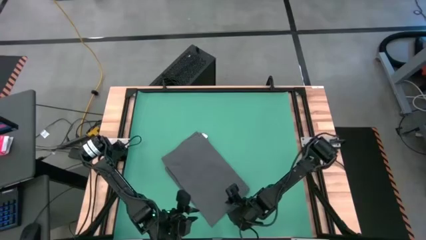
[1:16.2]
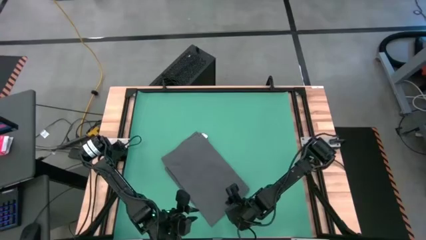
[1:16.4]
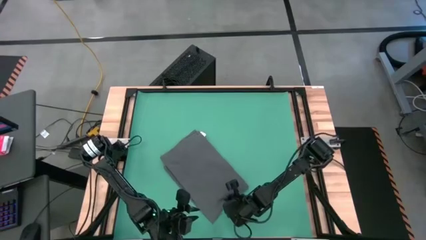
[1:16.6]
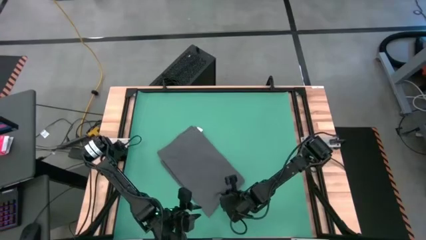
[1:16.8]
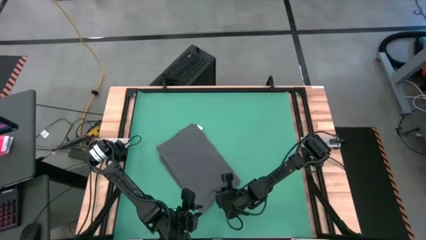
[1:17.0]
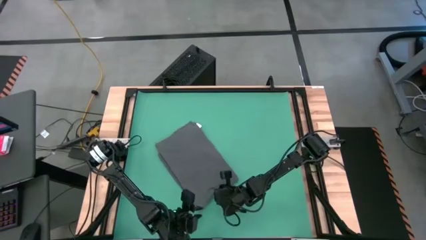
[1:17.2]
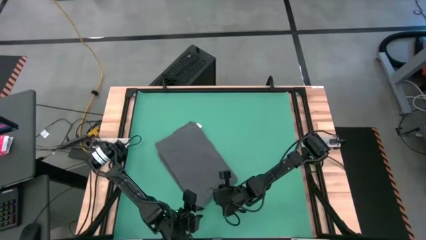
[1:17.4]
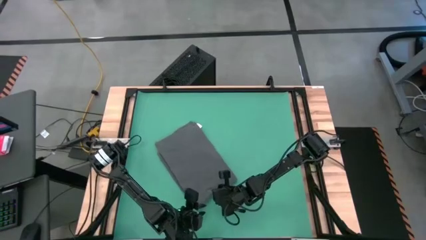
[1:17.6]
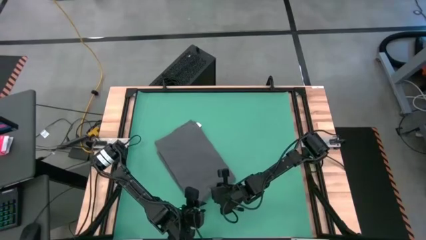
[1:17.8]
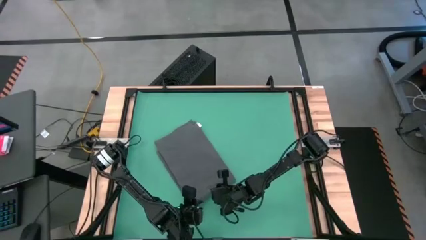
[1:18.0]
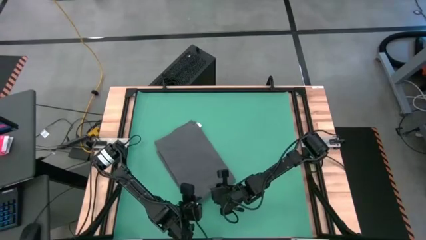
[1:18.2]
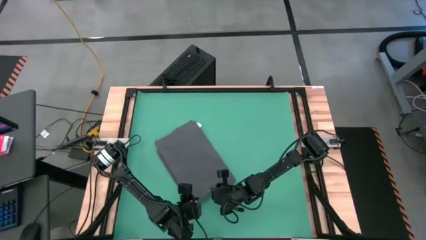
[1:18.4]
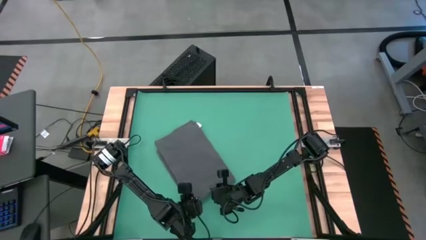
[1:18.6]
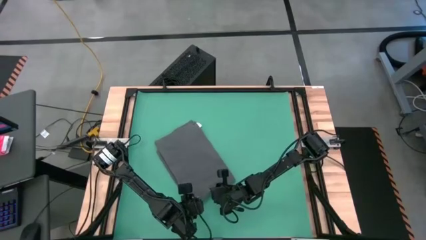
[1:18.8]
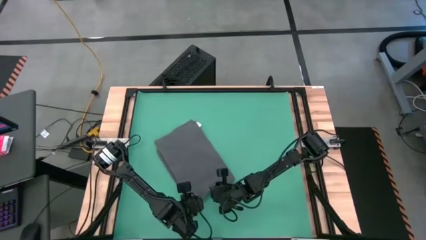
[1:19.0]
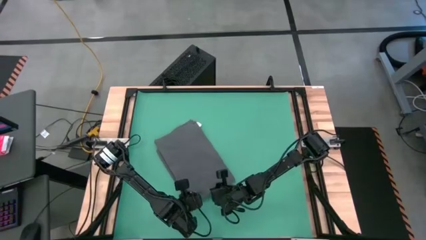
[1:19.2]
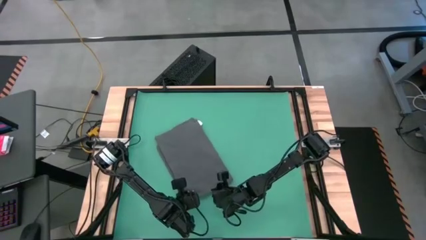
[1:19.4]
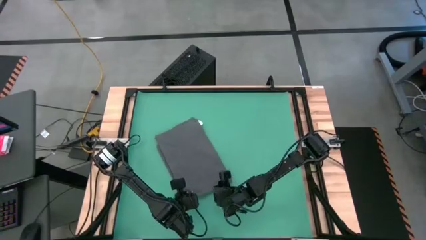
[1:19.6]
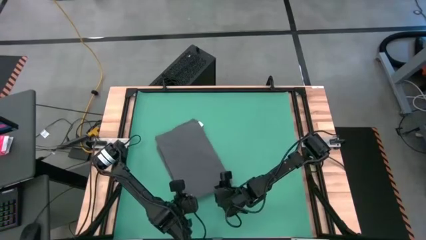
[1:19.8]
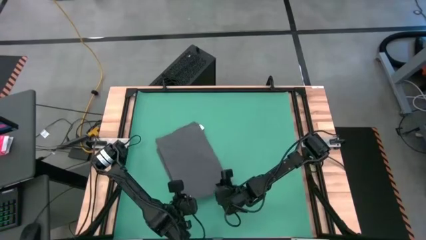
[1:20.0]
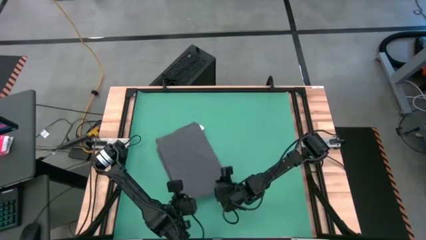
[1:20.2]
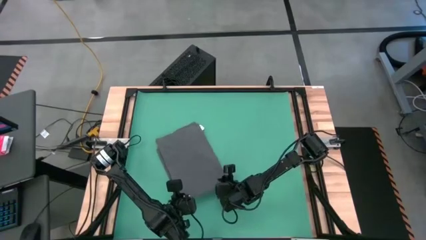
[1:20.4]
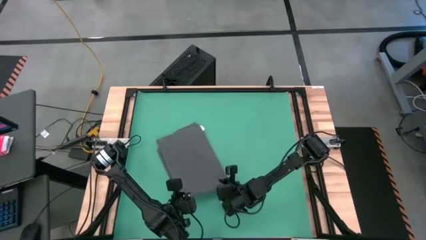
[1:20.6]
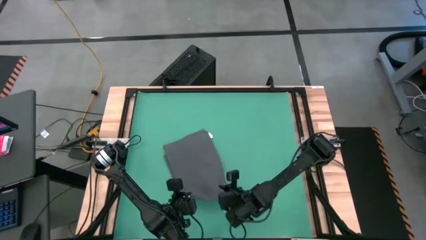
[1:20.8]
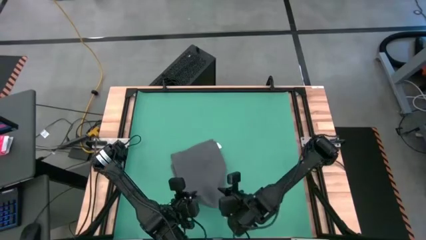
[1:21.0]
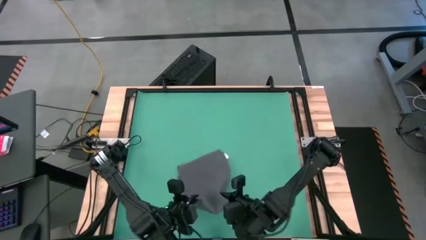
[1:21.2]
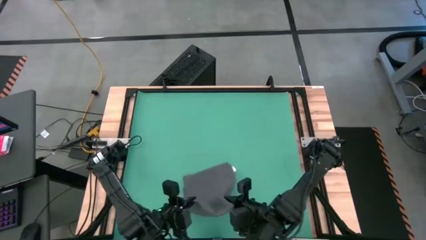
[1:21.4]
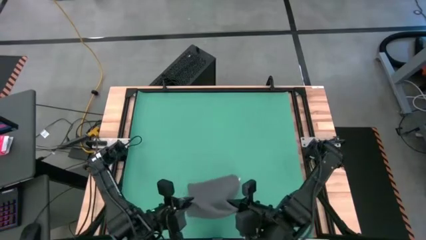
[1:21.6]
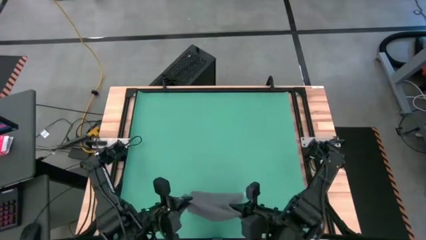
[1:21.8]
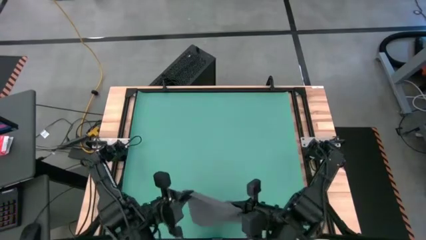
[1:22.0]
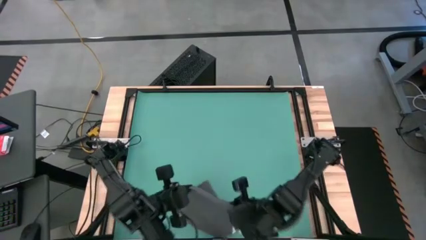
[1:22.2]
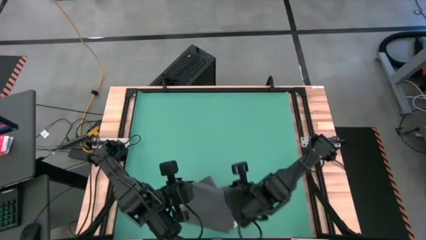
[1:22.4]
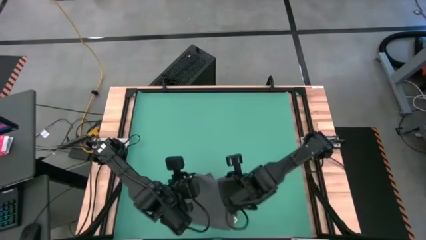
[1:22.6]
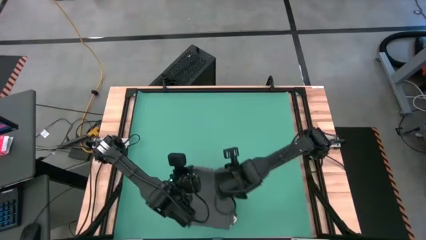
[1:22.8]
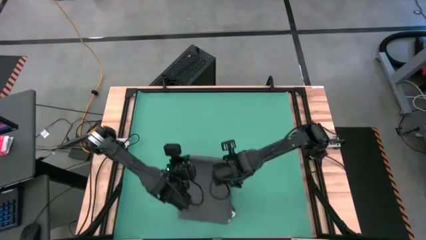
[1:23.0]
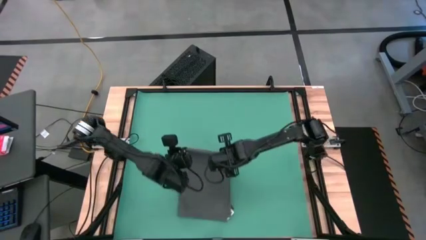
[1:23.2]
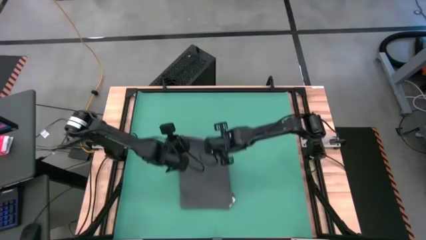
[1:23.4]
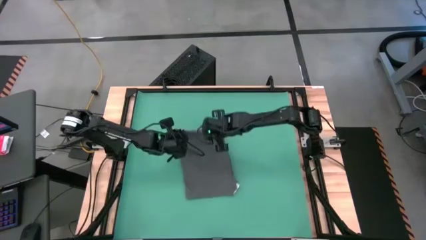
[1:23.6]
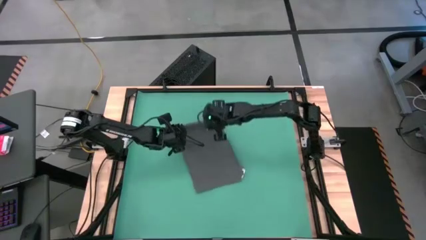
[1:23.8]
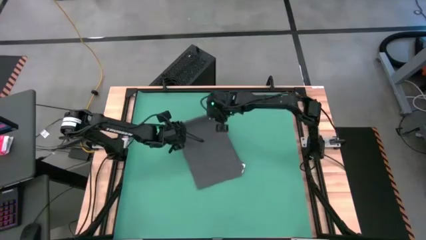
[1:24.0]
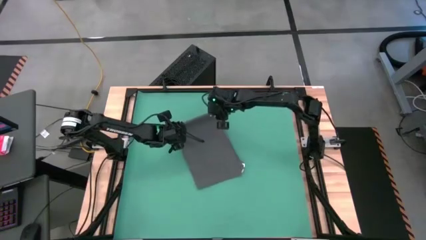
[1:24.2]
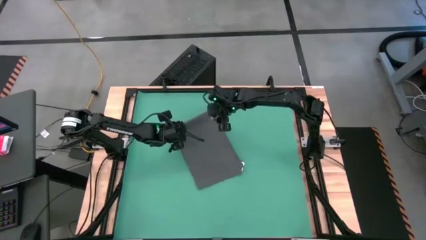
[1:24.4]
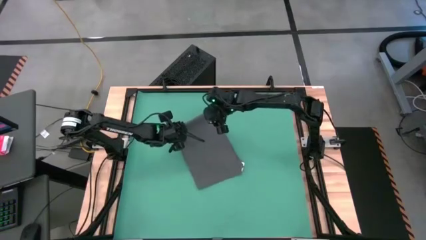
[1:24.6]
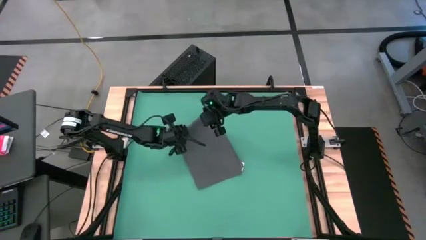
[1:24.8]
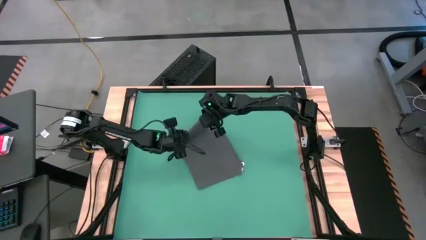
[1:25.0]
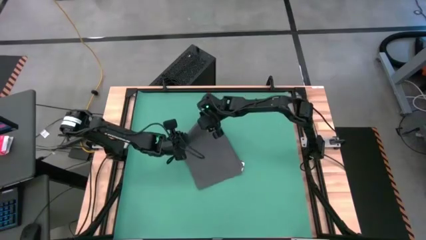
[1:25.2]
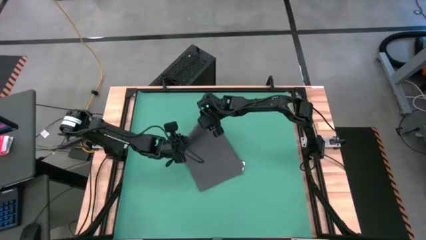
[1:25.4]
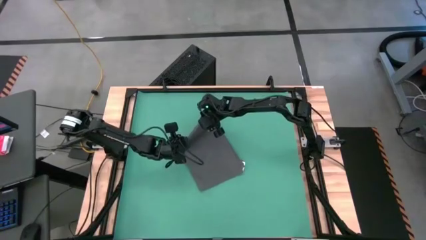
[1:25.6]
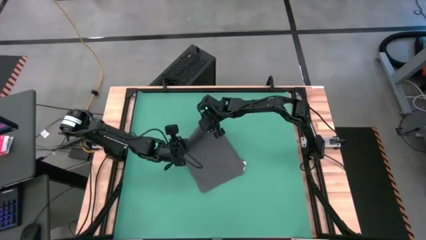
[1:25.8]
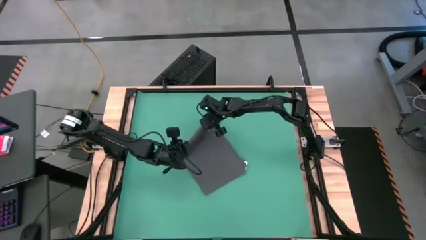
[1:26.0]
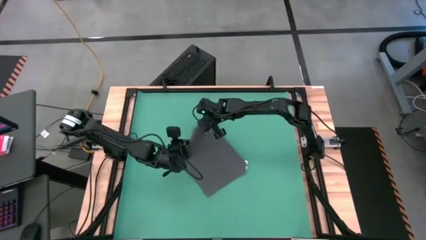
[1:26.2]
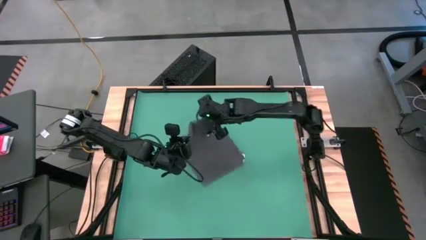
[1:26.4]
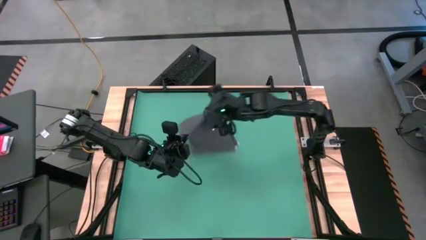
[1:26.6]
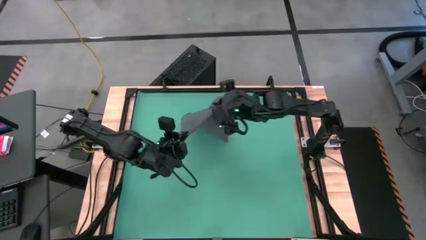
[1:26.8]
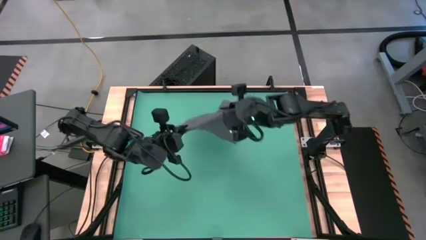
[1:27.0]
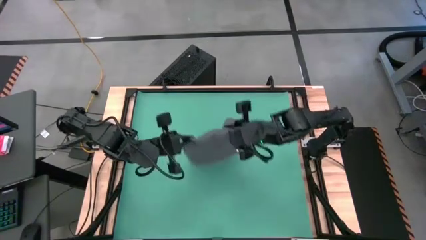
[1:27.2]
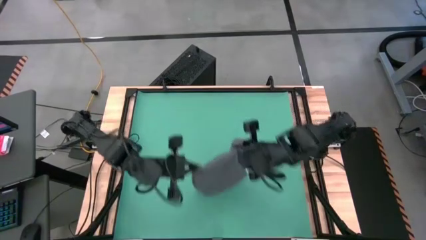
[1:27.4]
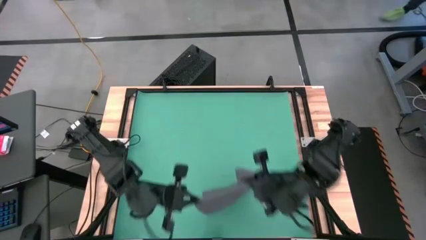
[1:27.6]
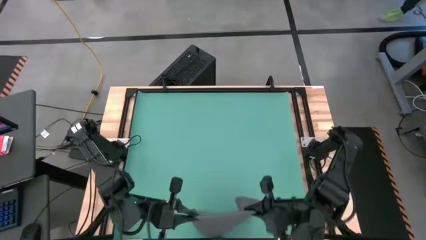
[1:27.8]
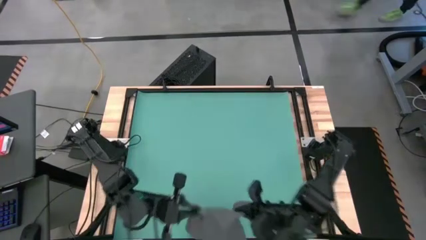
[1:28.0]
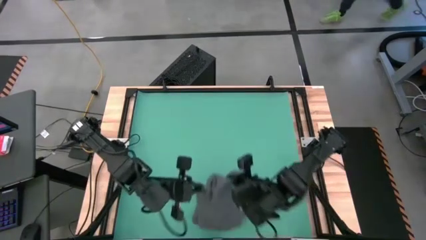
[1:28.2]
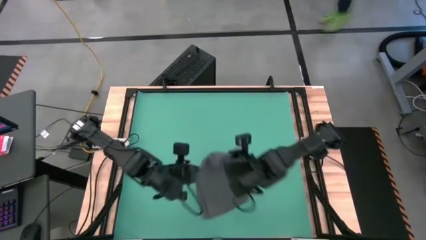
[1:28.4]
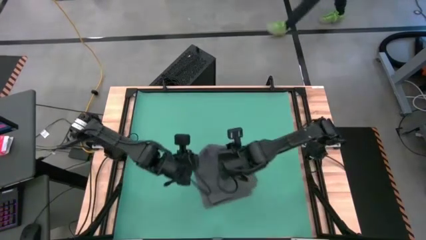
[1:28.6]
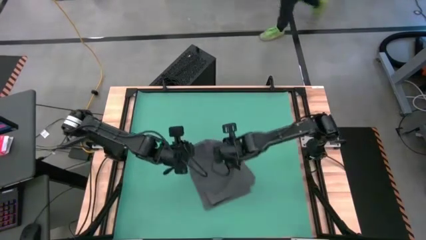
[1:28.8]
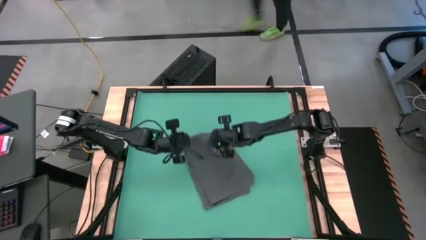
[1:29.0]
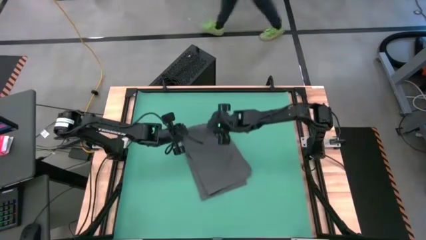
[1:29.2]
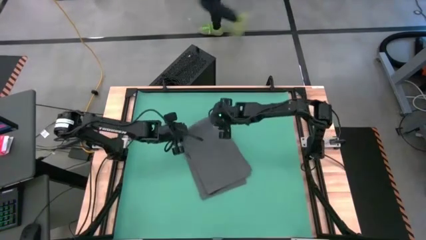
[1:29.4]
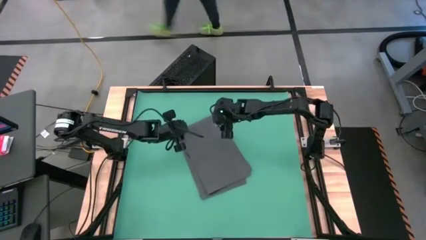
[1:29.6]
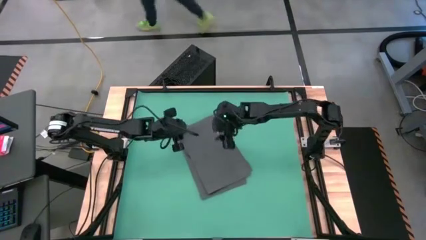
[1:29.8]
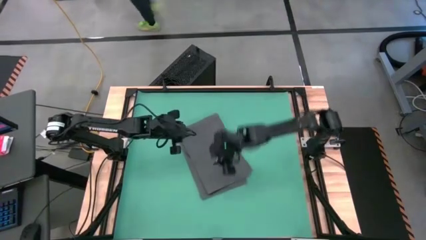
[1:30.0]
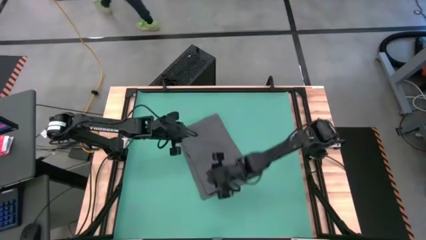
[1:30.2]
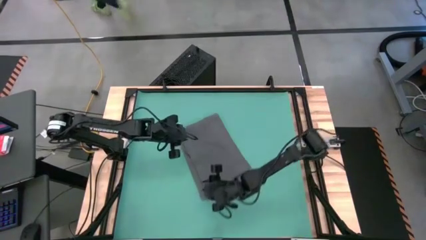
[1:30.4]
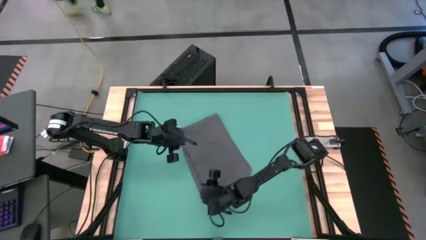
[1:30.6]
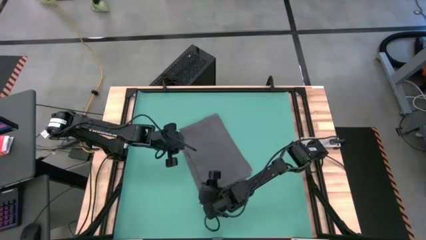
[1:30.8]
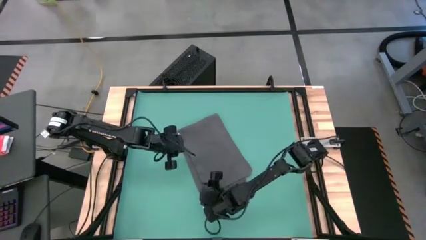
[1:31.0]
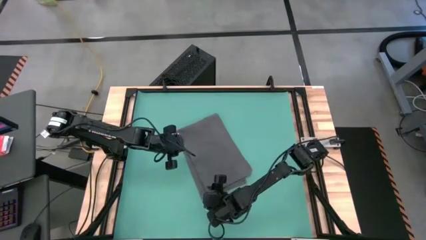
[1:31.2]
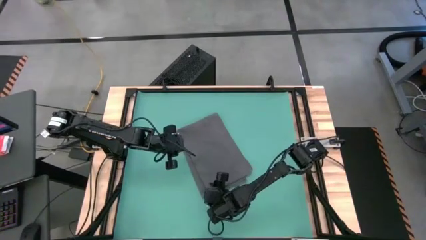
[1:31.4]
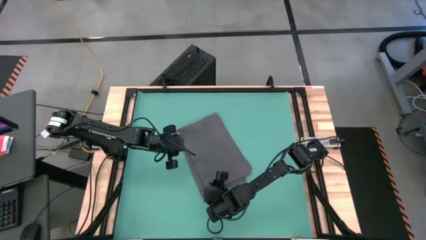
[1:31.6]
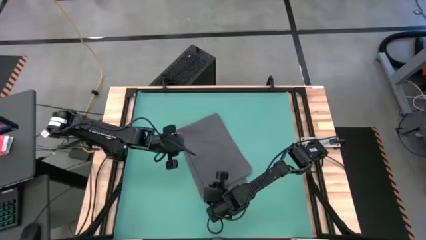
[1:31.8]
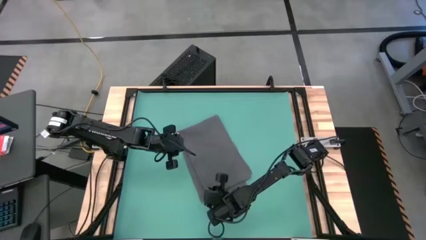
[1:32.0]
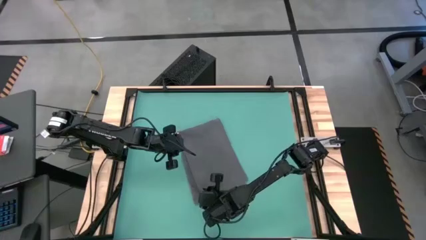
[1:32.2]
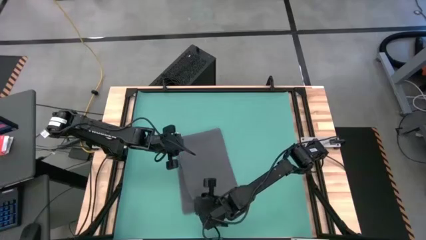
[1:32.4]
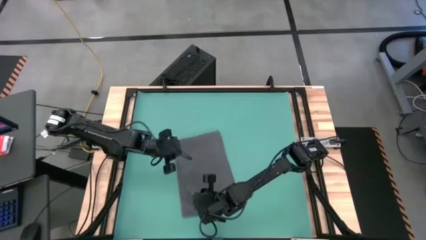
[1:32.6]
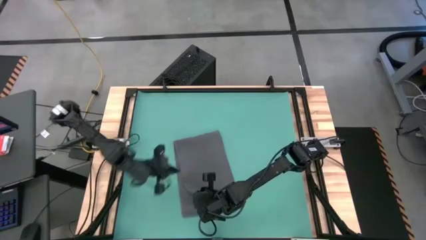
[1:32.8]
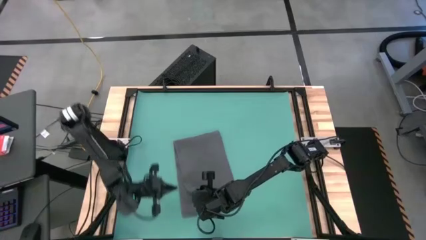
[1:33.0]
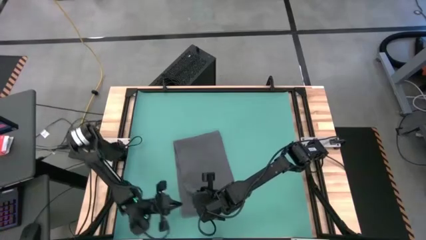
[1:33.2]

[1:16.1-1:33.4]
Task: Roll towel
Roll the gray towel
